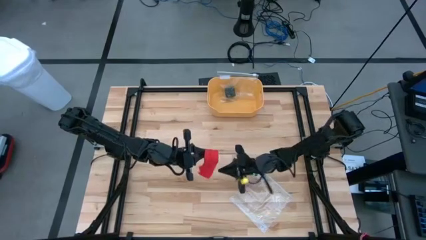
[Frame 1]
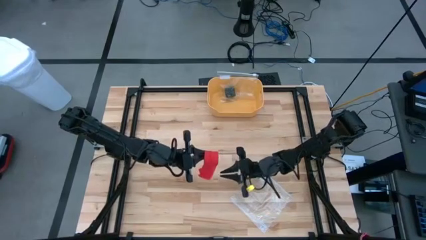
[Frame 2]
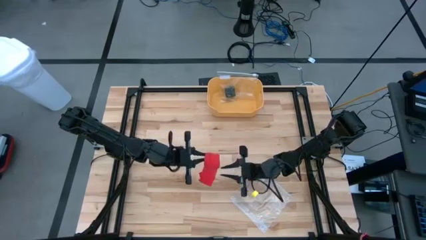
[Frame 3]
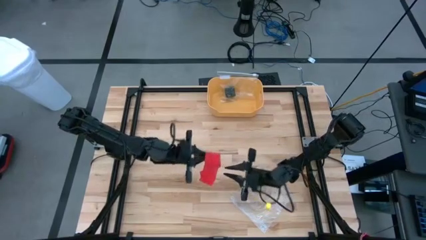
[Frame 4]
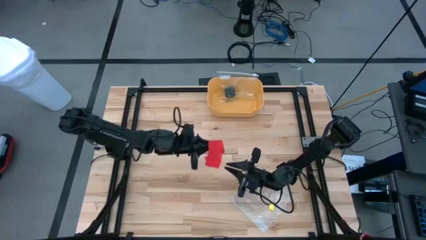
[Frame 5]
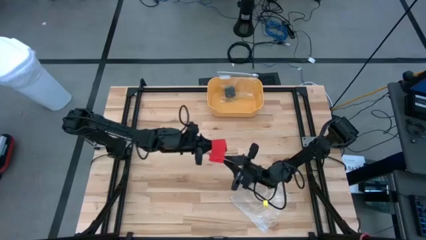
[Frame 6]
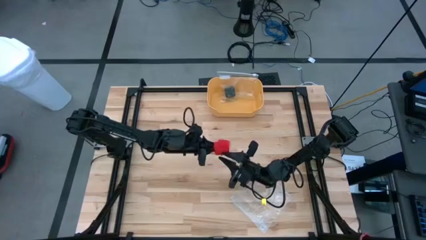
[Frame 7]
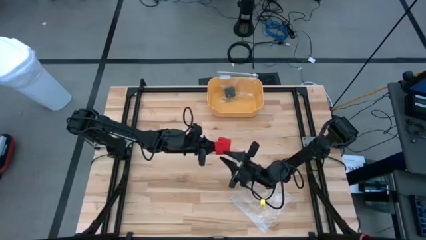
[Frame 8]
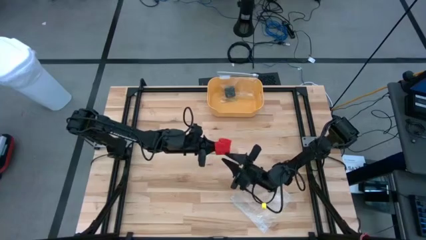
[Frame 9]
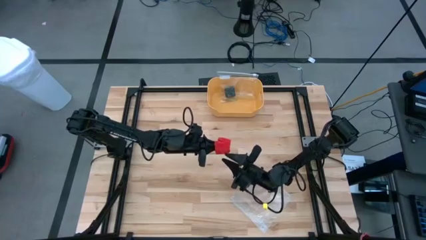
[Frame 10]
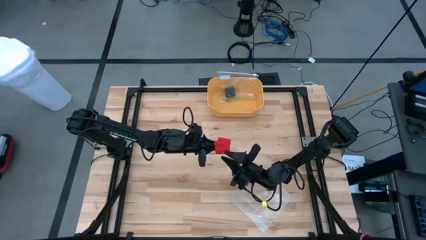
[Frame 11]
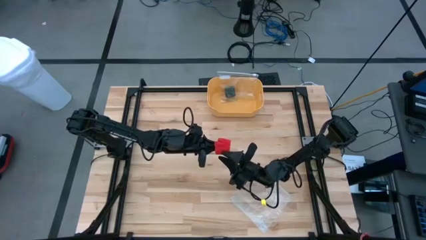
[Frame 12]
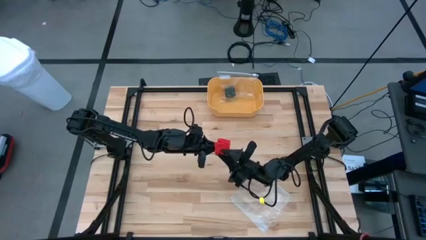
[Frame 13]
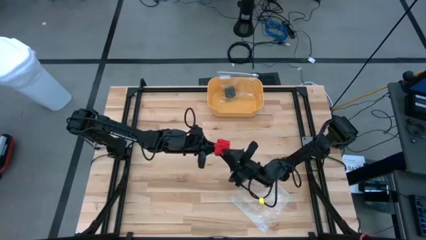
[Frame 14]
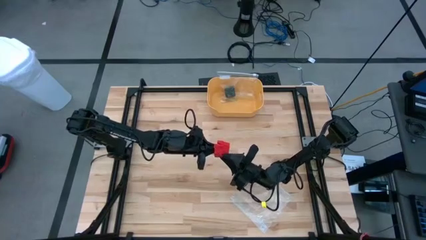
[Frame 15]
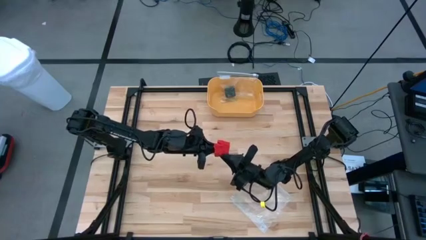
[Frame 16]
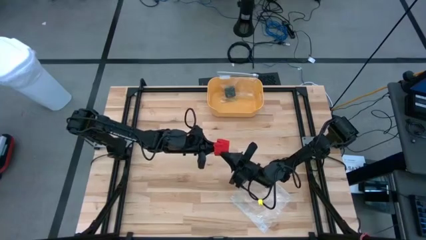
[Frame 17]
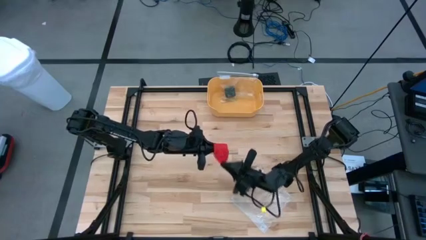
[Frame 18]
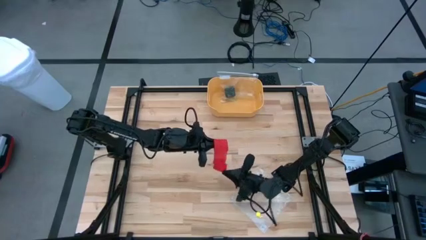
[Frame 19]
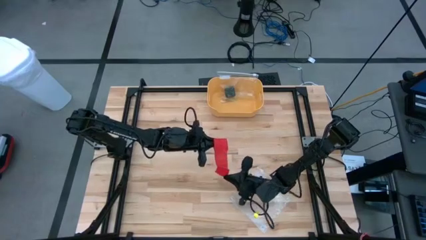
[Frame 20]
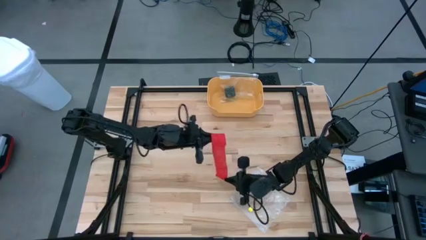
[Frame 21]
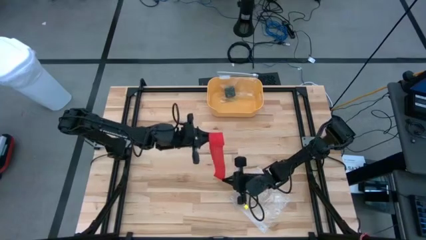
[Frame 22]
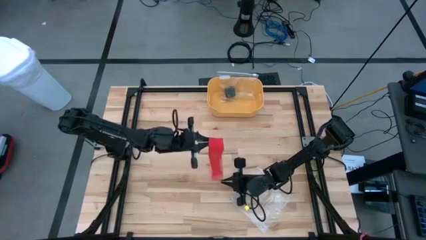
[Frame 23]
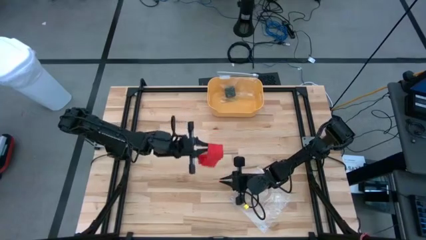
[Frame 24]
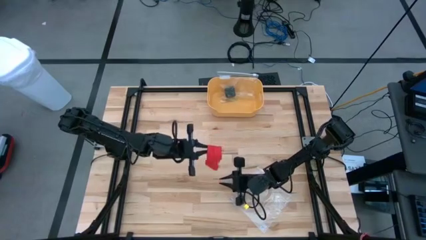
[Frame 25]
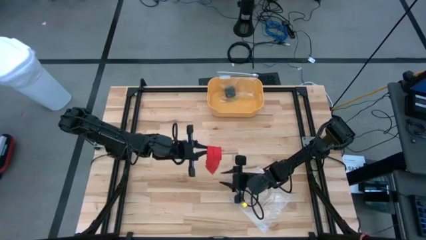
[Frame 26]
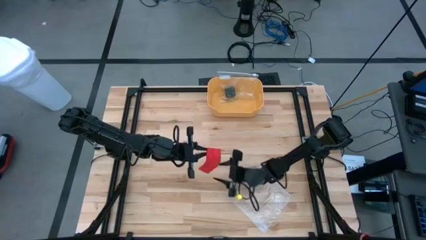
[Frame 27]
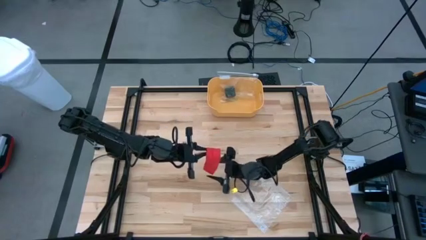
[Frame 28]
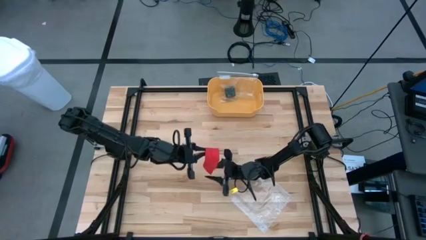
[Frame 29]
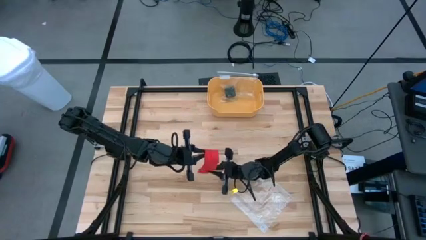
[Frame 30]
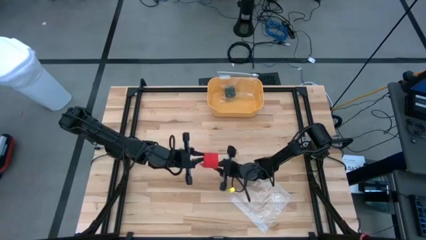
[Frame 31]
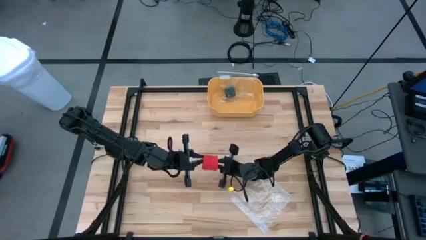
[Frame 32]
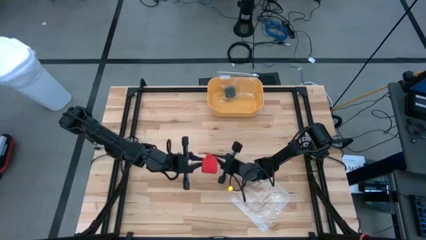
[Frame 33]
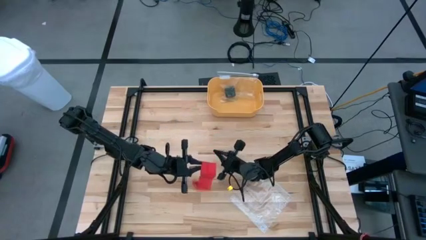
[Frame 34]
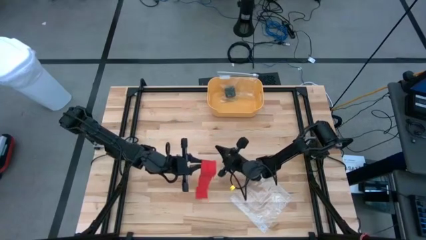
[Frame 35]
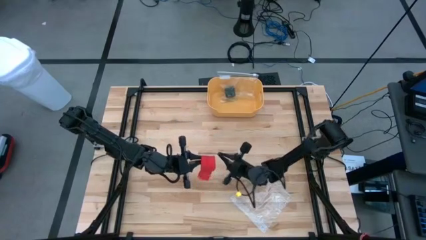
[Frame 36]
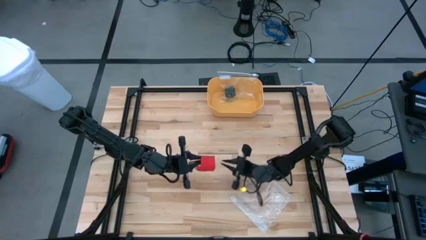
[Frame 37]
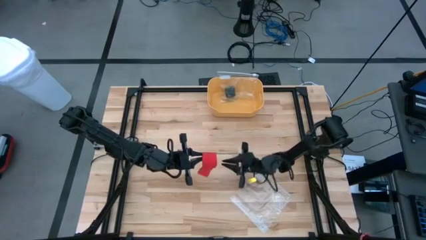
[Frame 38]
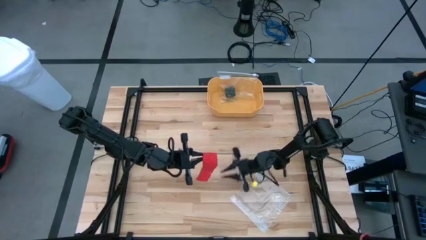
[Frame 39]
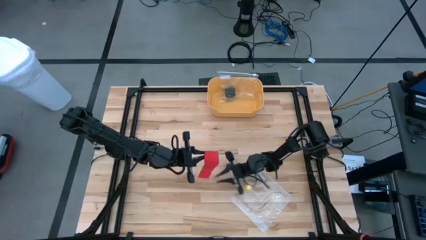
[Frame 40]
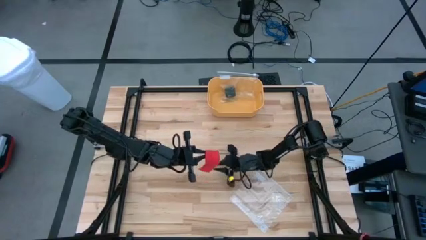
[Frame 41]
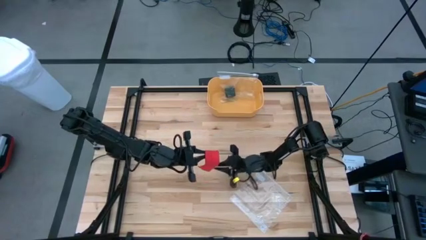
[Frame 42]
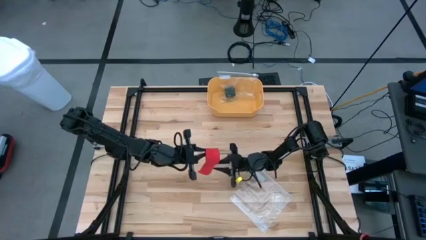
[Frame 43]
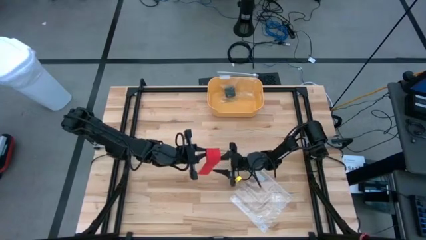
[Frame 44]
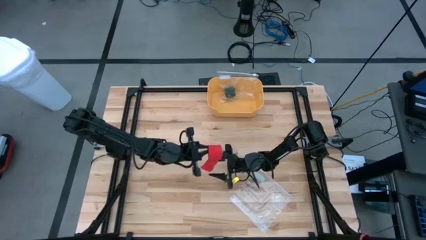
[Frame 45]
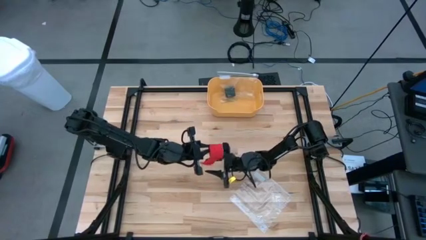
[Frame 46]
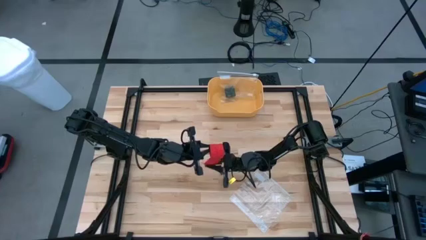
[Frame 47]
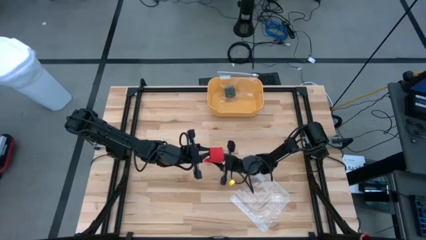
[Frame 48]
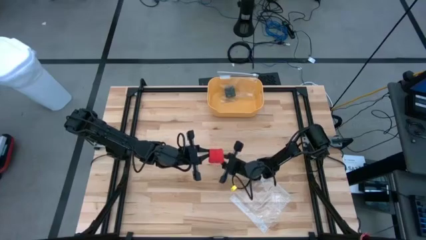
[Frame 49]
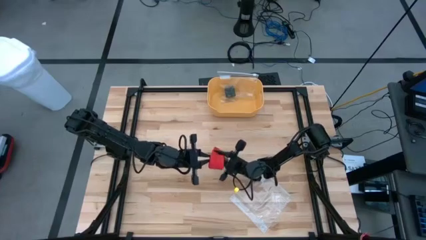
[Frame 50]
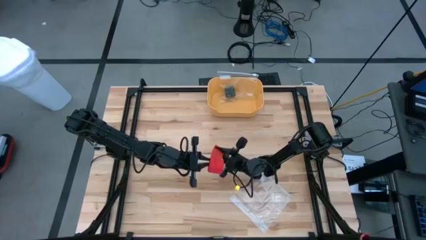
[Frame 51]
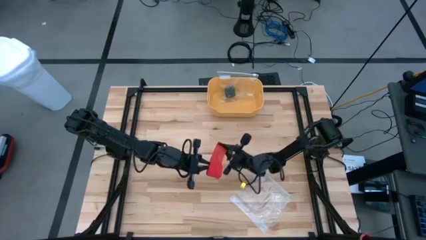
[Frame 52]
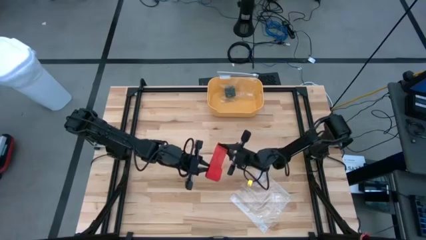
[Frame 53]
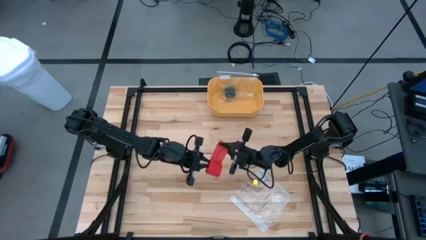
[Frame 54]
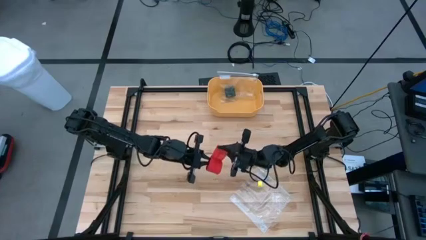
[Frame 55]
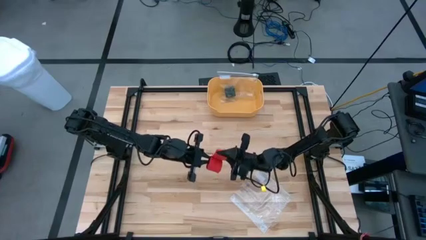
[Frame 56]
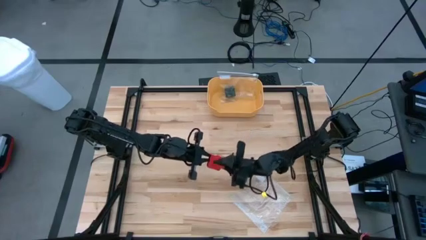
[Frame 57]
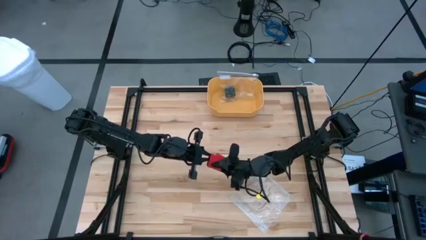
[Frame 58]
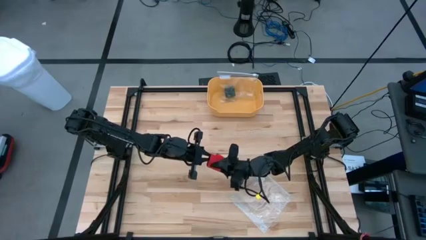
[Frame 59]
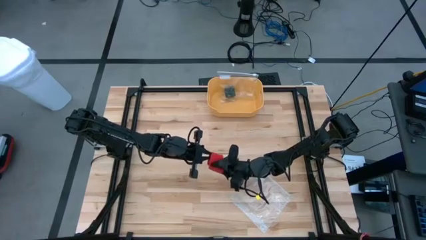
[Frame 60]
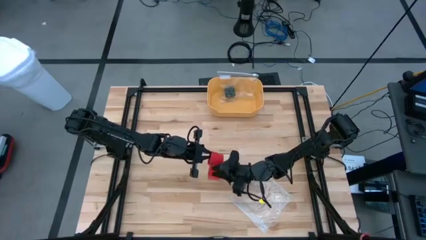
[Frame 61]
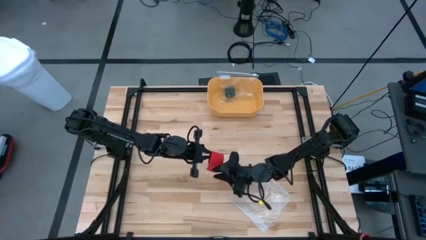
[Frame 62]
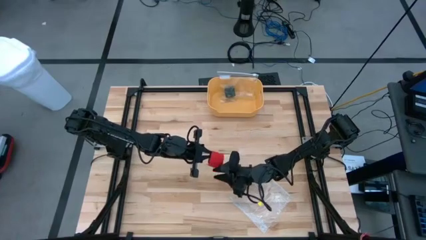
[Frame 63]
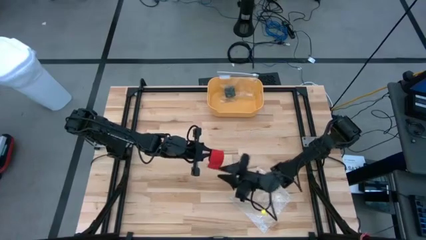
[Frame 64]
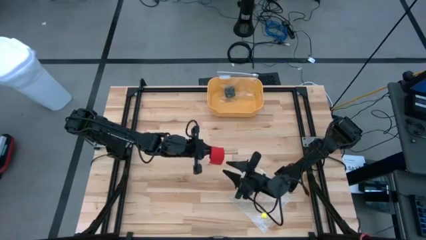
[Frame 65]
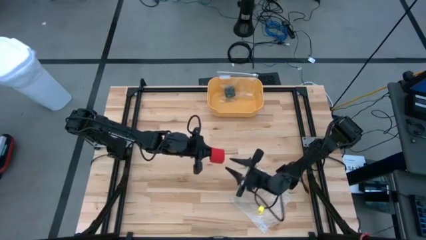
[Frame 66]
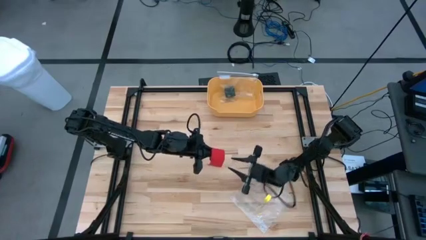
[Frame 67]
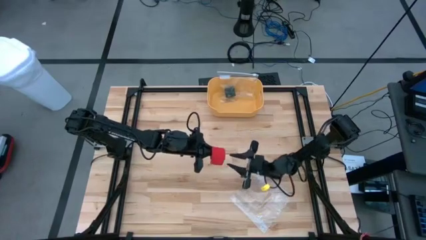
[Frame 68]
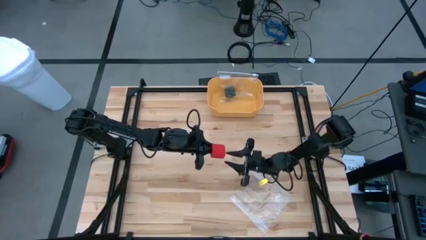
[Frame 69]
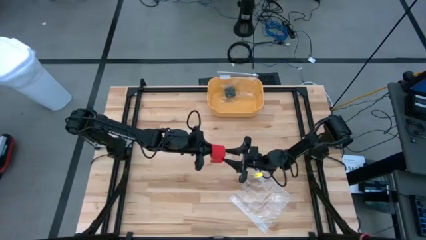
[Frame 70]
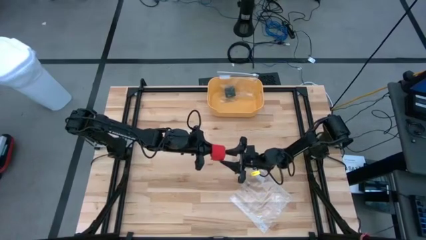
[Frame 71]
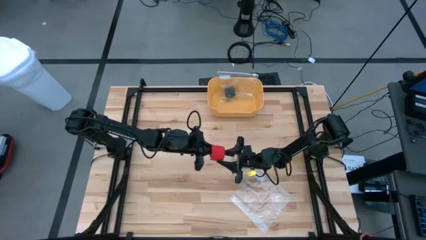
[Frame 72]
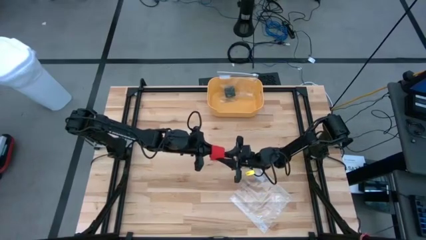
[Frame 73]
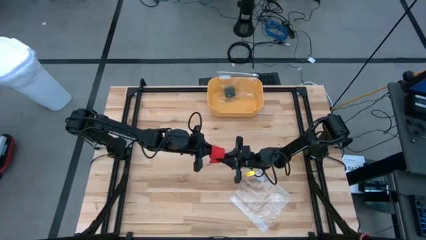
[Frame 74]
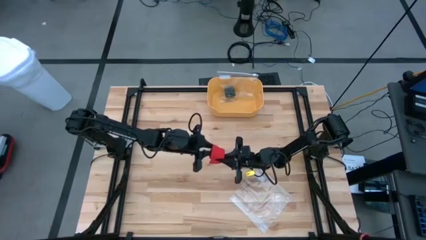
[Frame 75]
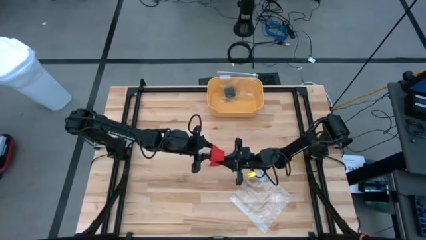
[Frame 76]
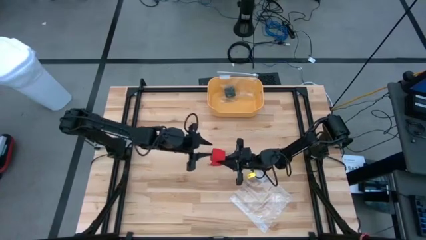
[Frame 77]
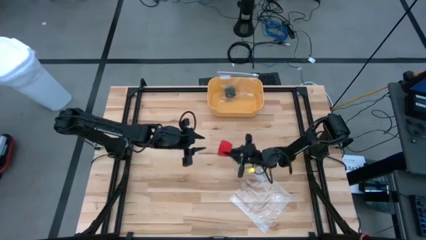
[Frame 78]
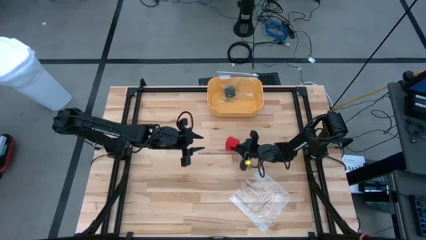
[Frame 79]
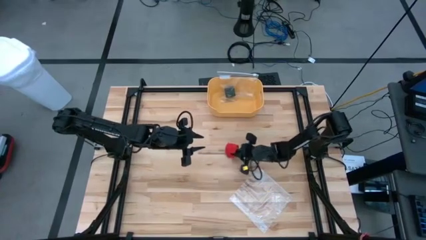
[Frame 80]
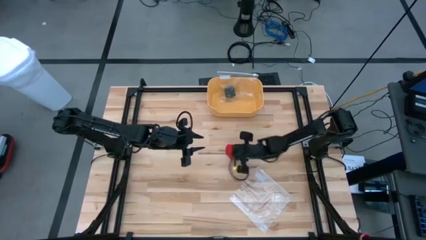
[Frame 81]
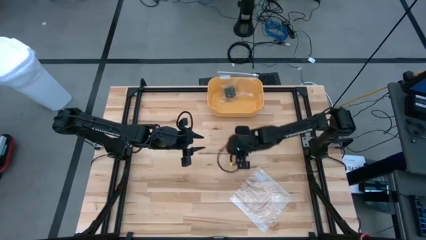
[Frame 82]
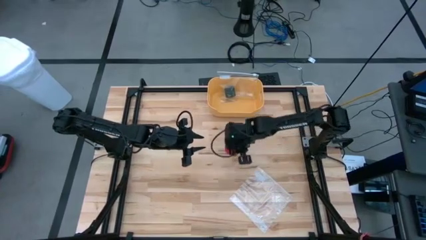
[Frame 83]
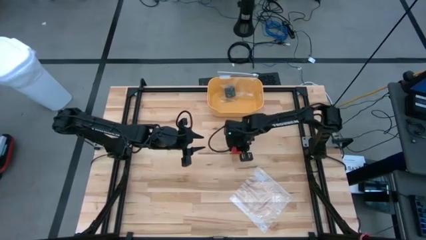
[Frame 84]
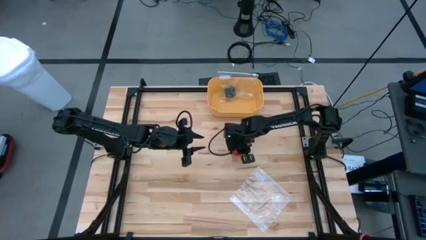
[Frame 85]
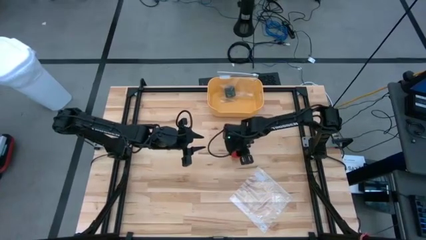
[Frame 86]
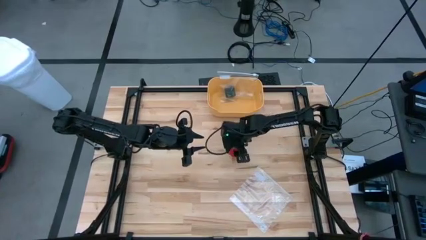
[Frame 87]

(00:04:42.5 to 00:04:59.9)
Task: Roll bandage
Roll the red bandage
